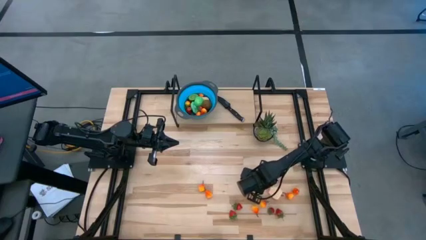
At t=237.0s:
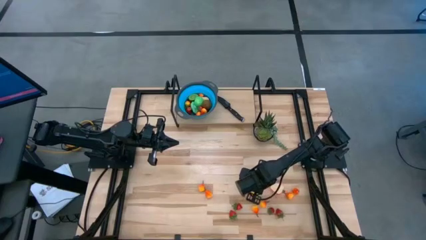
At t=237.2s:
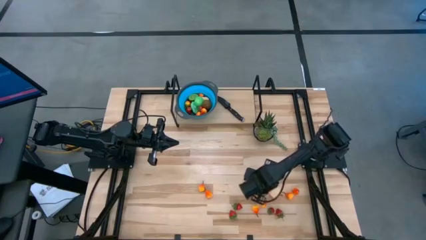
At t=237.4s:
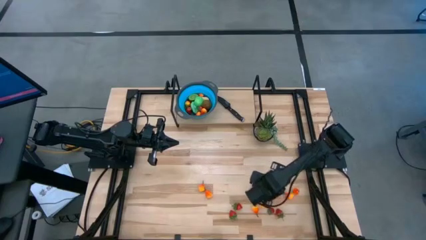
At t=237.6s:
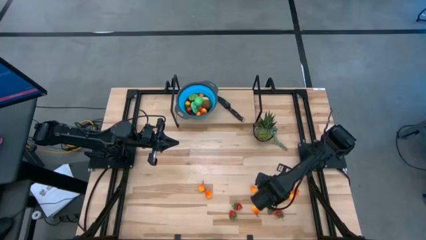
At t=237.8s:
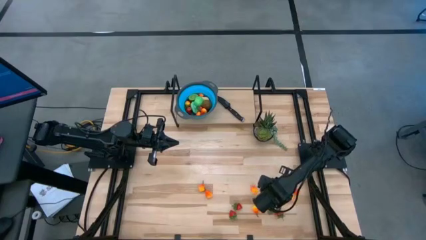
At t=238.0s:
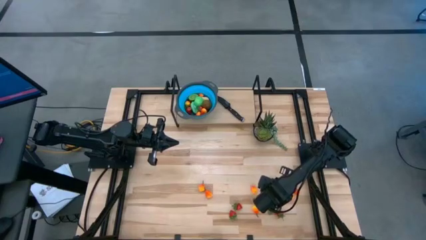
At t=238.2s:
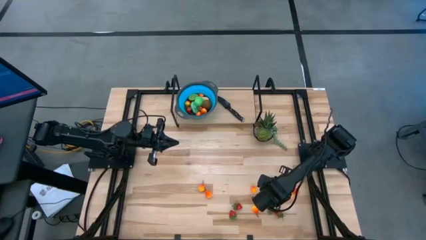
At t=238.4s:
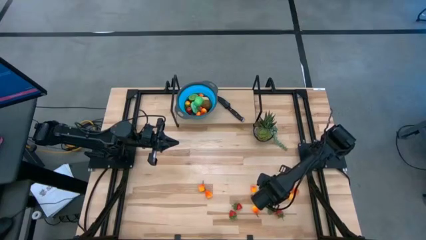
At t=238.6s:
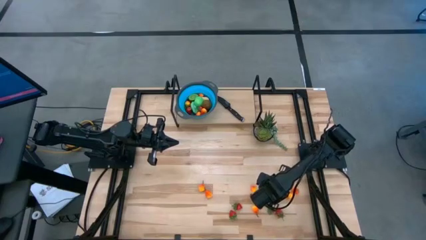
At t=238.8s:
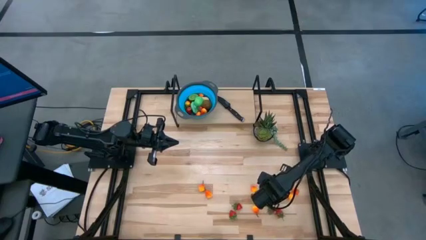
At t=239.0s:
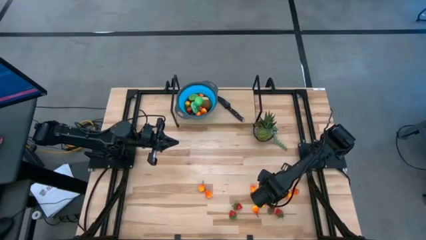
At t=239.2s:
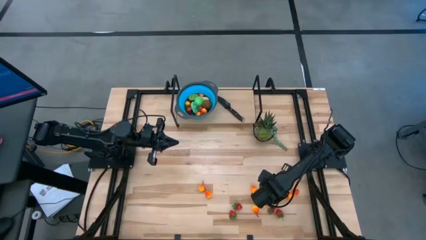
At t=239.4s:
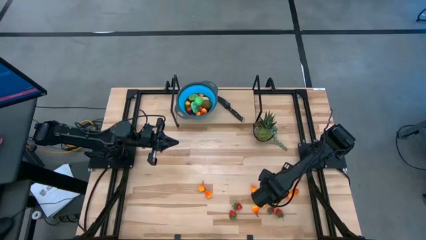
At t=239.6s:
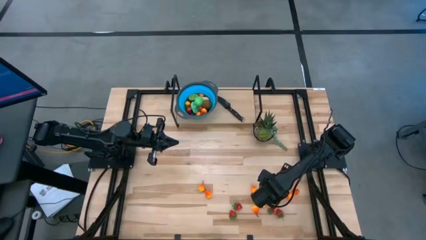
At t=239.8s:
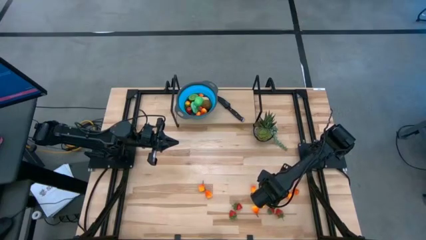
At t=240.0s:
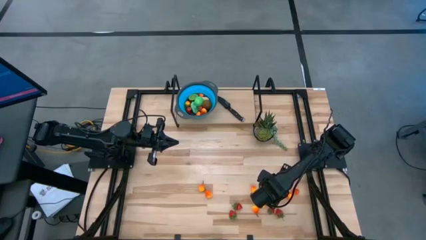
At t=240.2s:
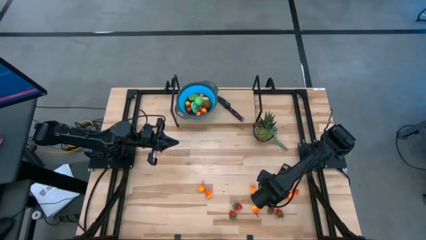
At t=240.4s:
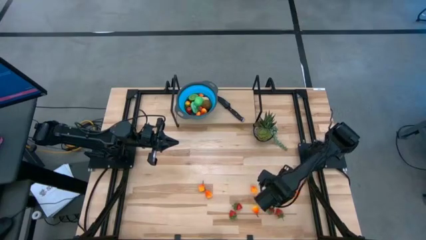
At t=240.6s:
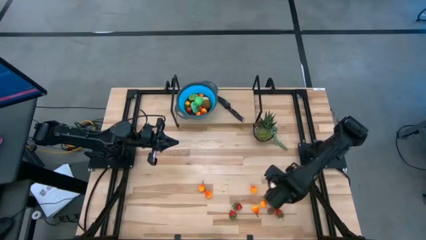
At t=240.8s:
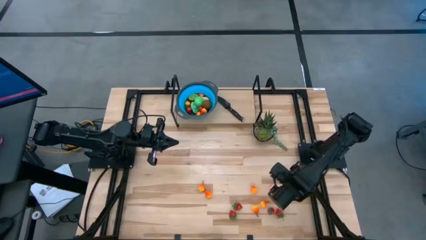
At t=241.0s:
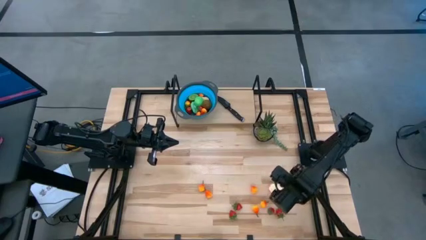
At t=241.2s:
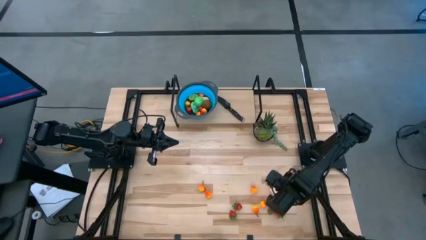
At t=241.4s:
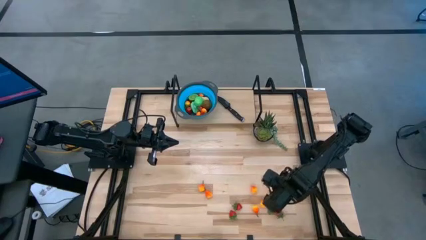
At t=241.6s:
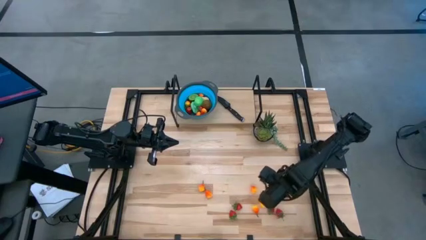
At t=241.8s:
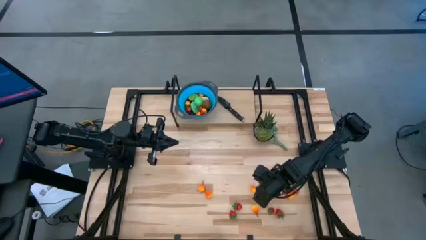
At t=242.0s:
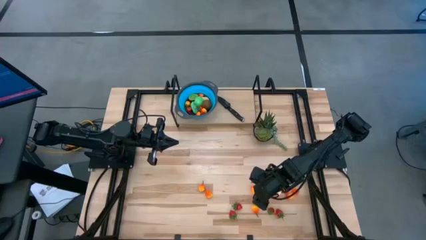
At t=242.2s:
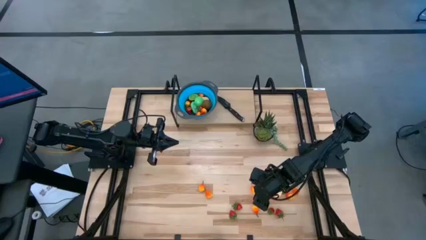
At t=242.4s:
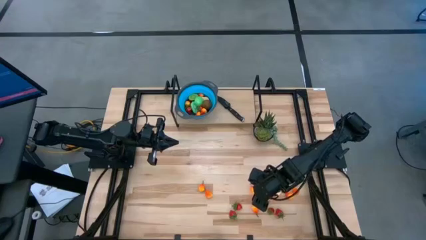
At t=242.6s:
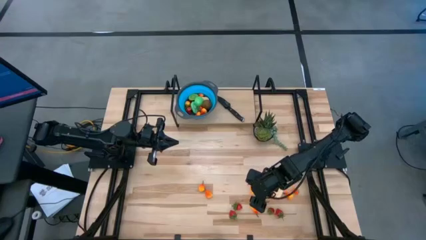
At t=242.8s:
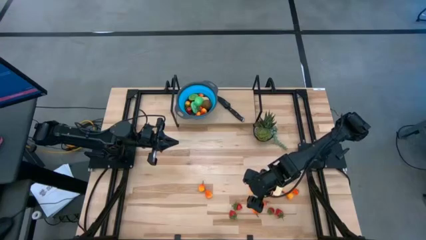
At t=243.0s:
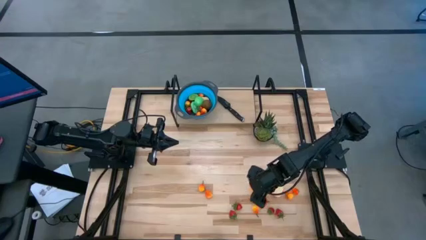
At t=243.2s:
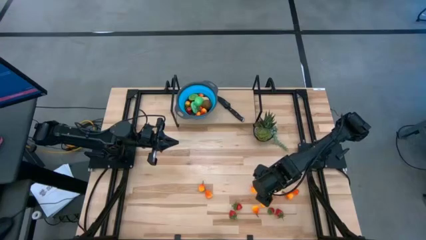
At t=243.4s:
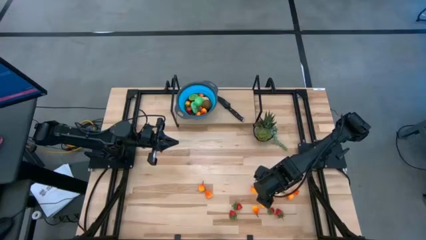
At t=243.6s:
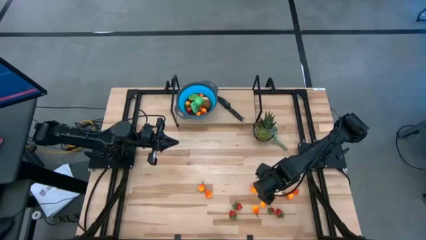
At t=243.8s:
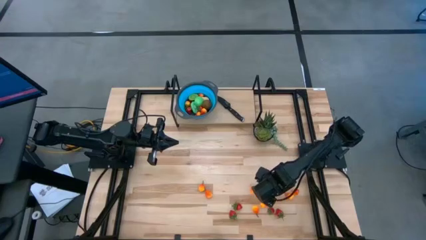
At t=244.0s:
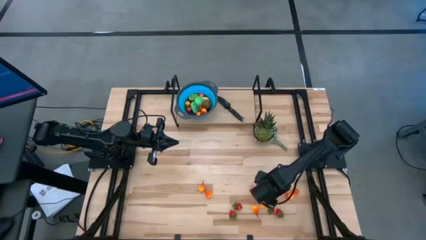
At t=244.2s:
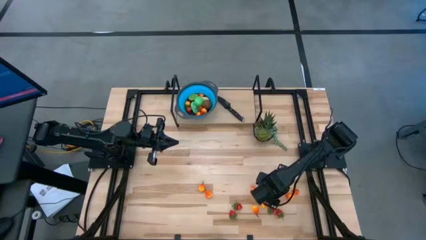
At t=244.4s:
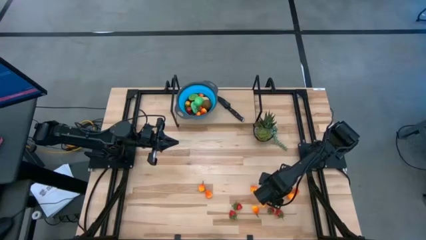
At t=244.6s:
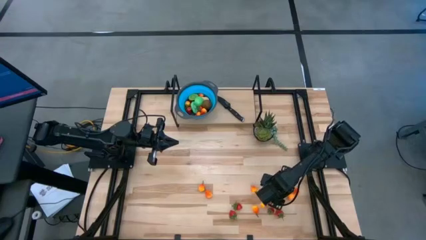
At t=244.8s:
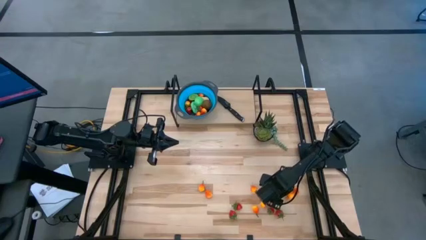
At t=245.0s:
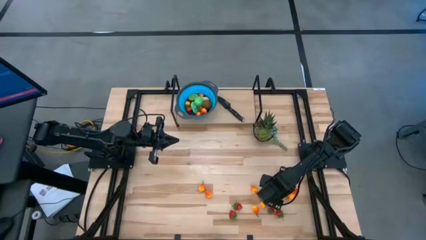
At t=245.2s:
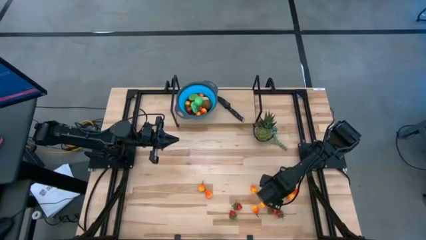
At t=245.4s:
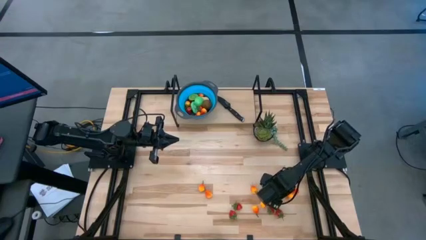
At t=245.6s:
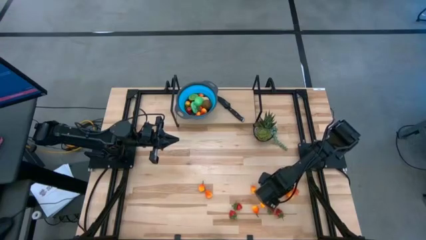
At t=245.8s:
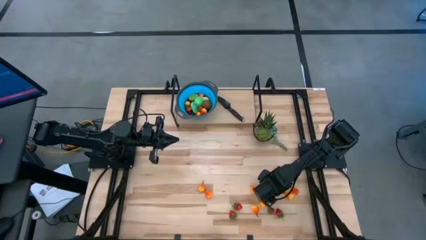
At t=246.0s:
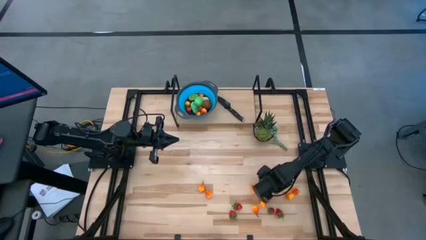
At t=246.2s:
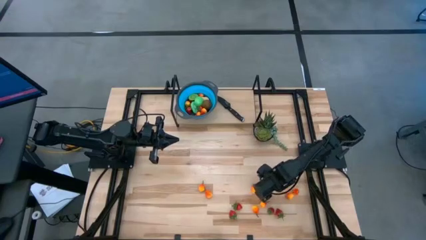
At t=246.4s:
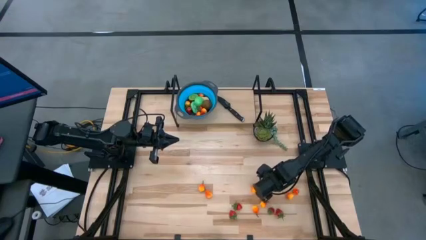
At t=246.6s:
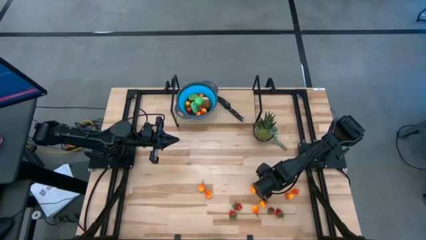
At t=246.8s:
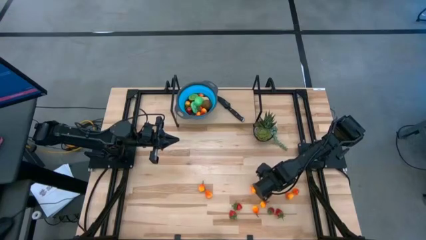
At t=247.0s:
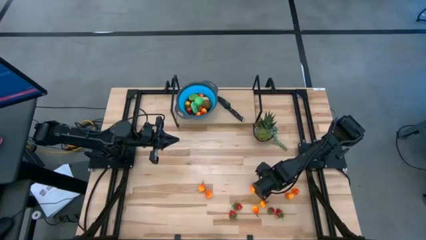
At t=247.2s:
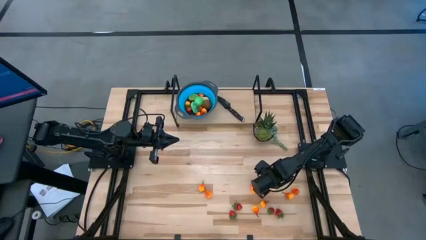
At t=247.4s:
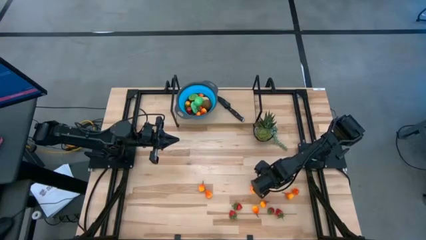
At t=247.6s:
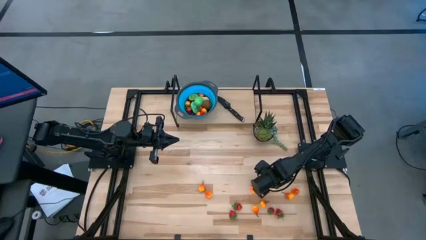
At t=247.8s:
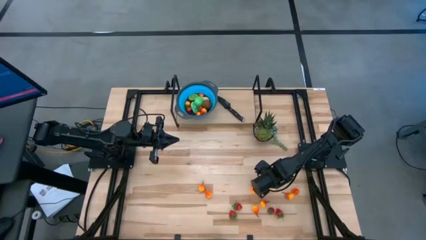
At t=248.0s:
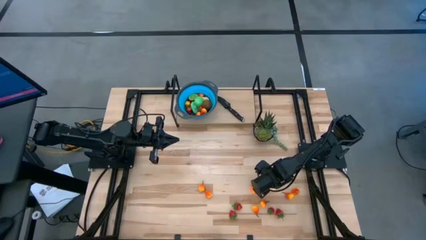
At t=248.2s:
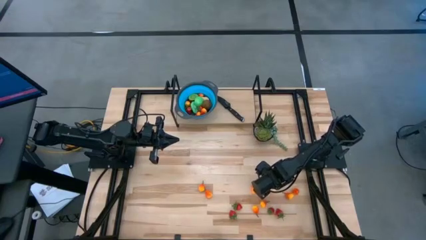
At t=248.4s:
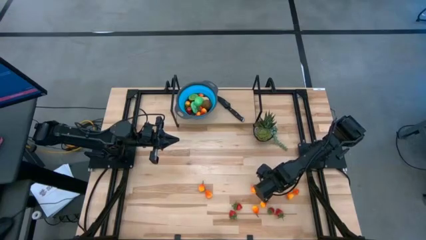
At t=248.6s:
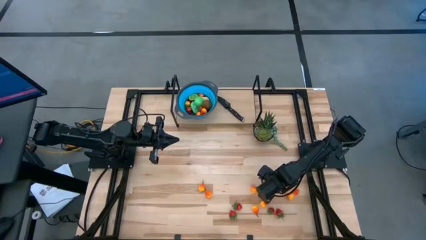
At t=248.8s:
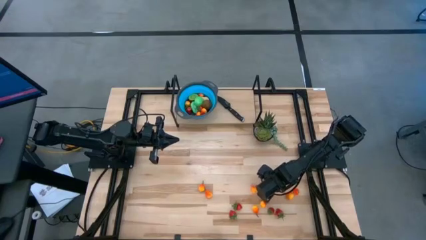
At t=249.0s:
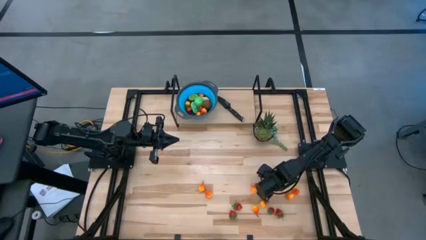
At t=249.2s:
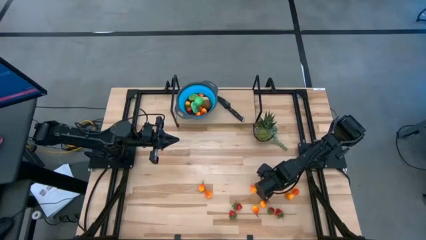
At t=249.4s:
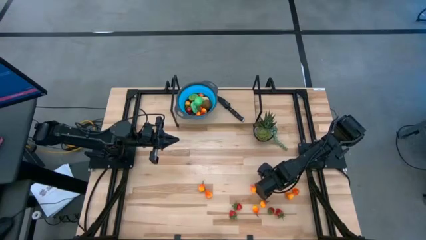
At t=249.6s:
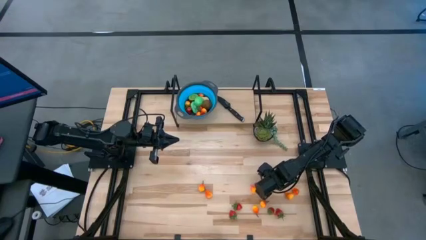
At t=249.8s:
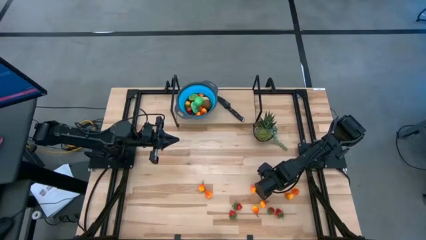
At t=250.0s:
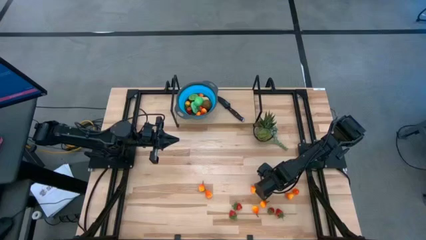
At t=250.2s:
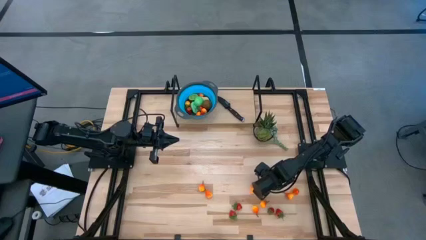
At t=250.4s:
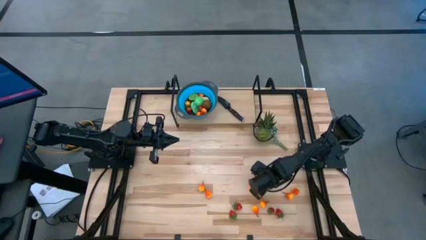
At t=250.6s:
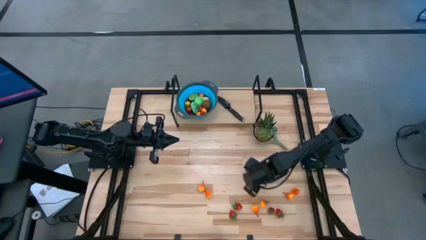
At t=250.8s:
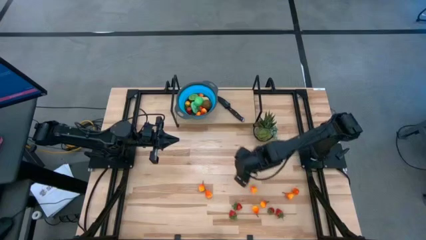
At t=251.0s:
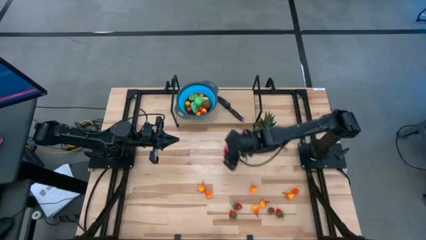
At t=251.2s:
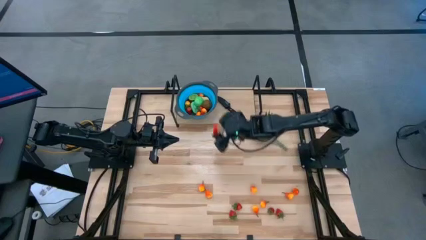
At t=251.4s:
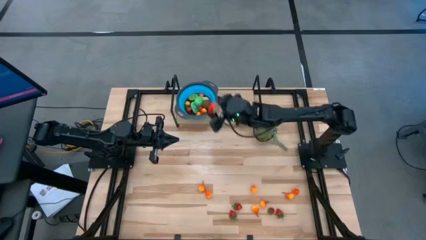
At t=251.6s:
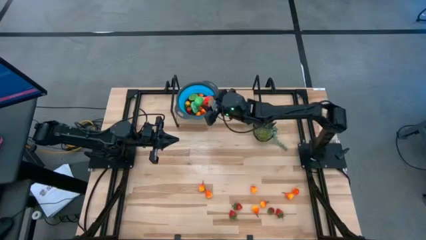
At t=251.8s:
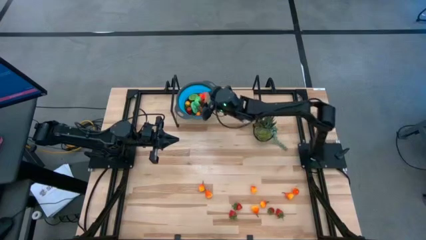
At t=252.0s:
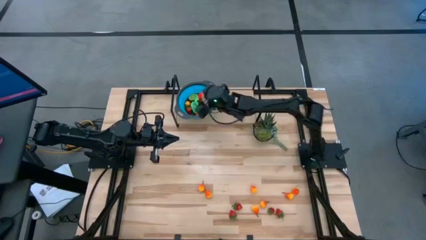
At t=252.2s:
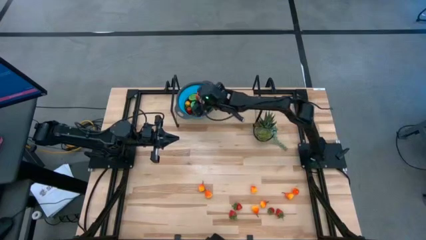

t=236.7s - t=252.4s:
Task: Pick & Place Fruit
Put the apple into the basket
